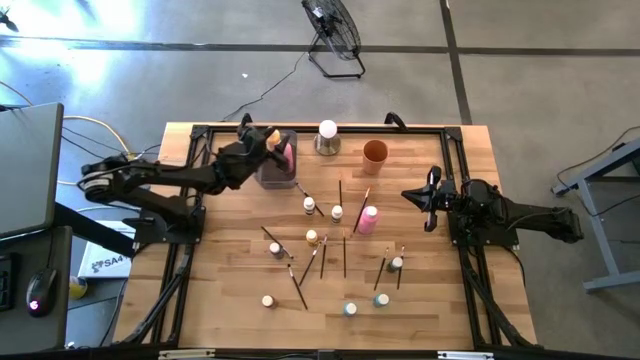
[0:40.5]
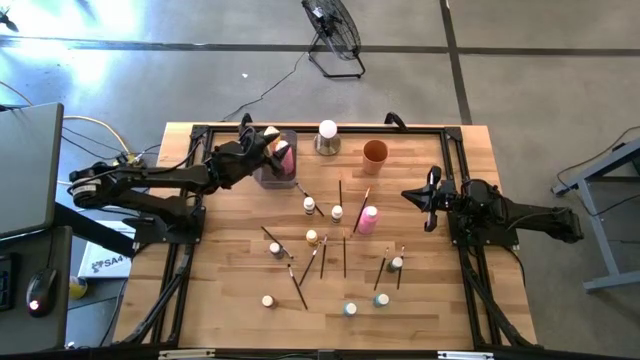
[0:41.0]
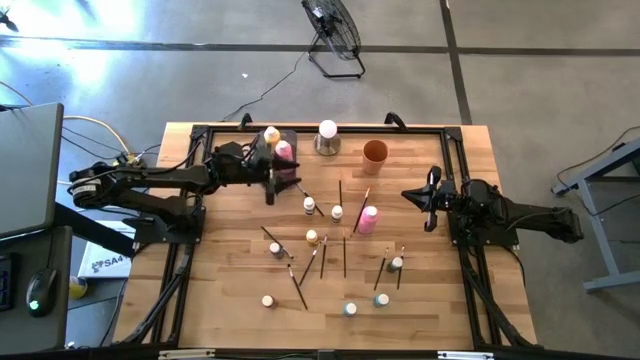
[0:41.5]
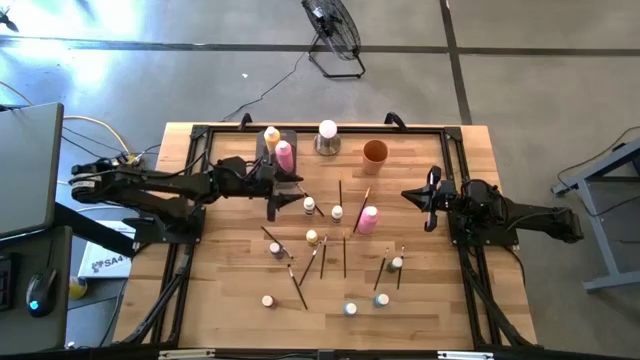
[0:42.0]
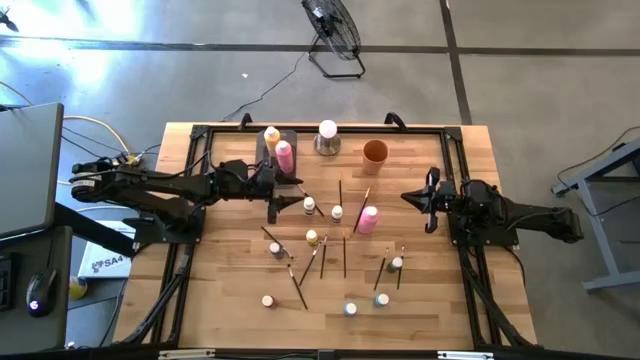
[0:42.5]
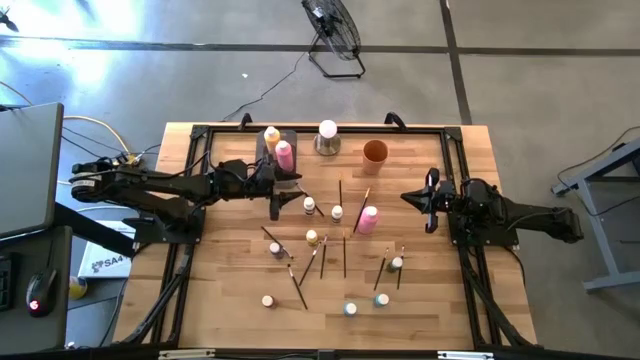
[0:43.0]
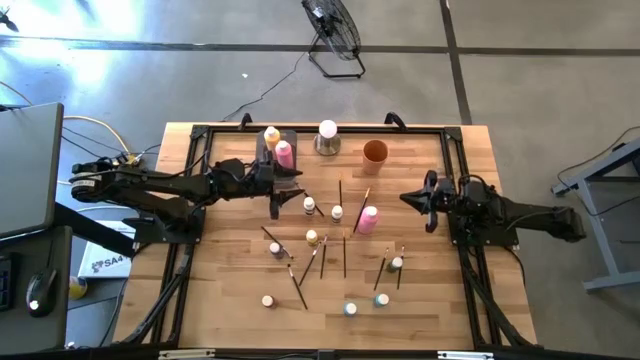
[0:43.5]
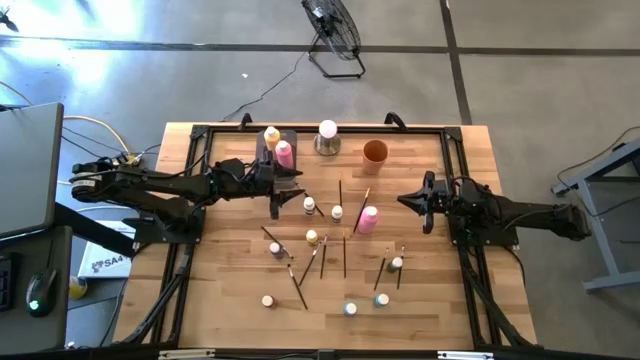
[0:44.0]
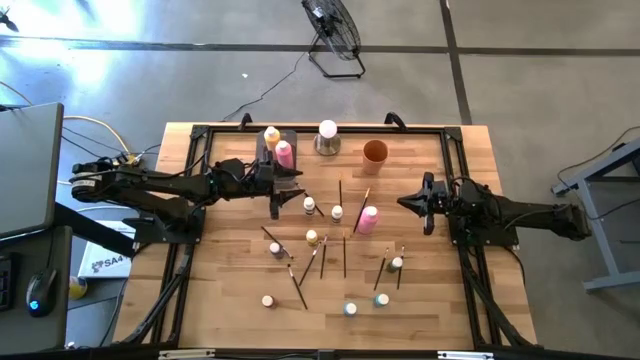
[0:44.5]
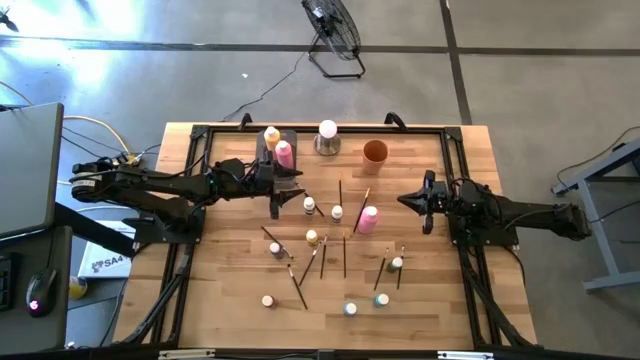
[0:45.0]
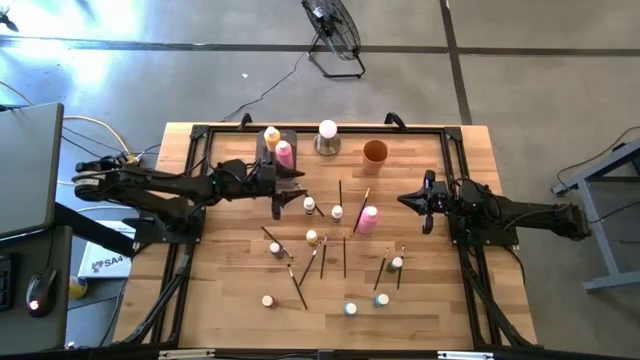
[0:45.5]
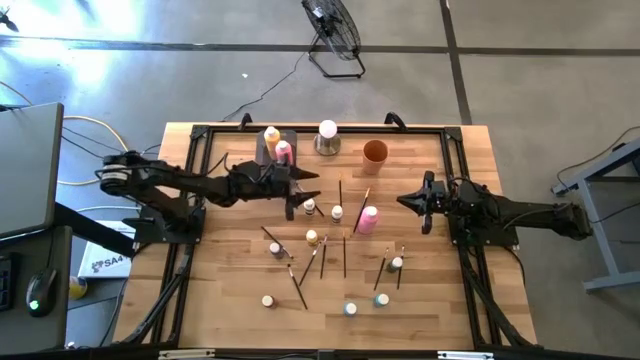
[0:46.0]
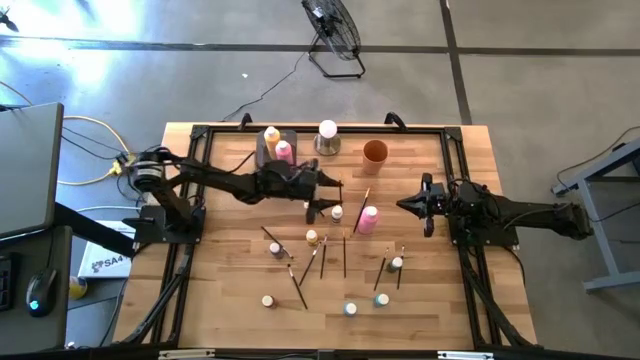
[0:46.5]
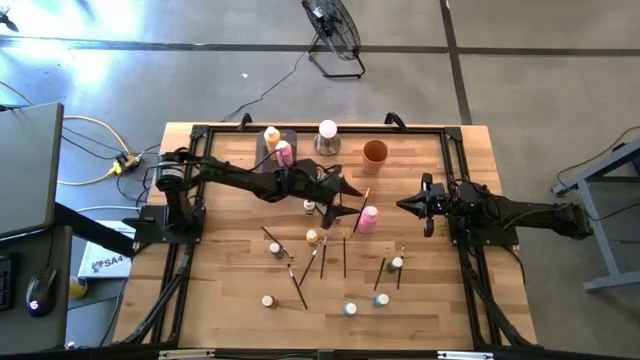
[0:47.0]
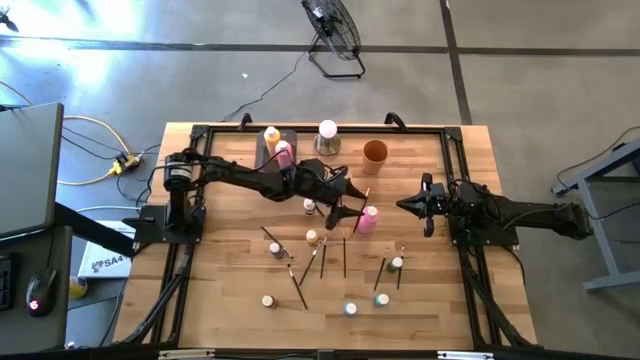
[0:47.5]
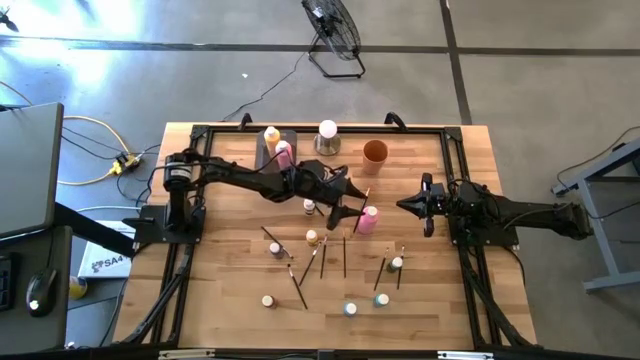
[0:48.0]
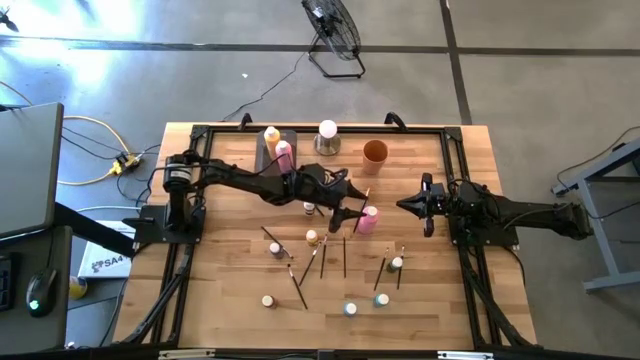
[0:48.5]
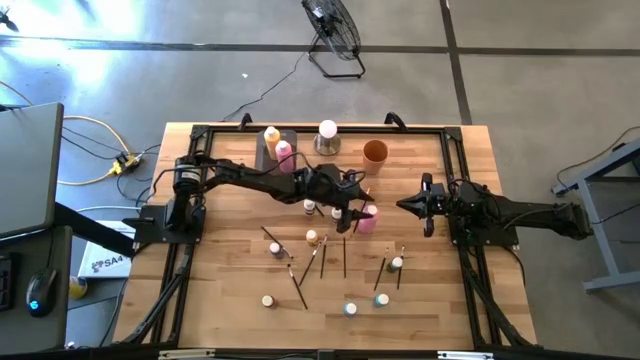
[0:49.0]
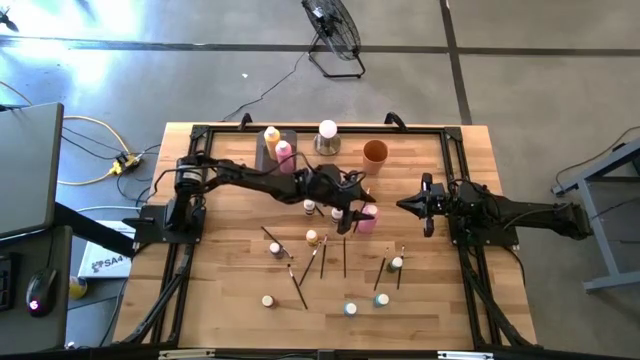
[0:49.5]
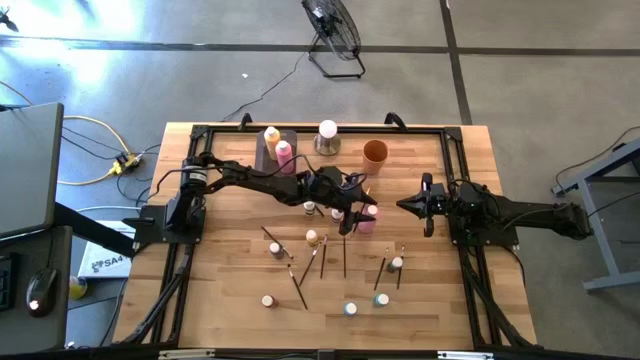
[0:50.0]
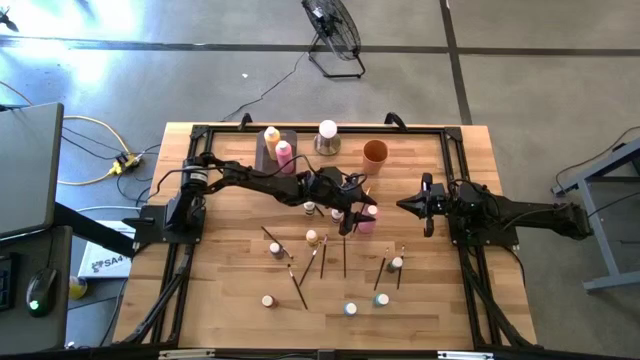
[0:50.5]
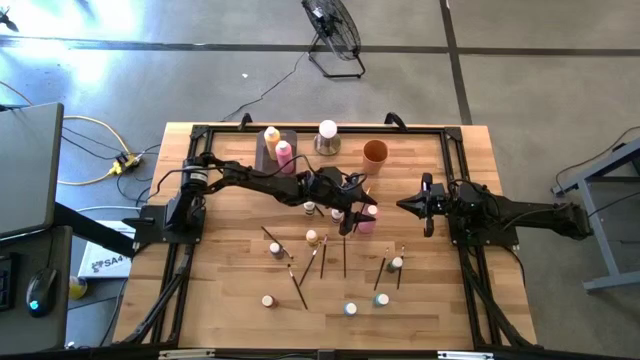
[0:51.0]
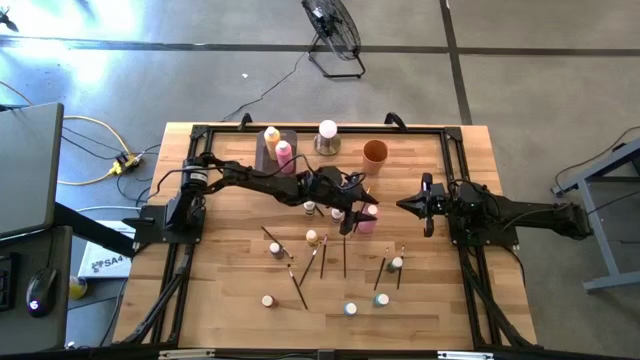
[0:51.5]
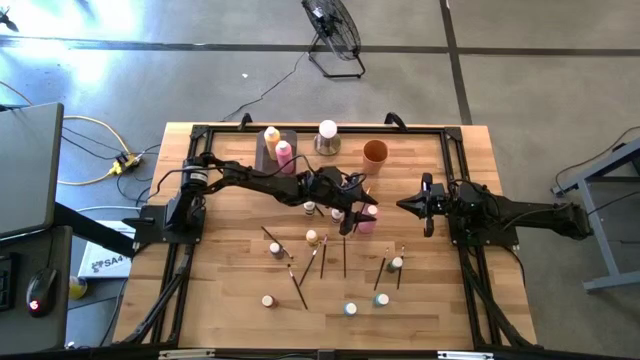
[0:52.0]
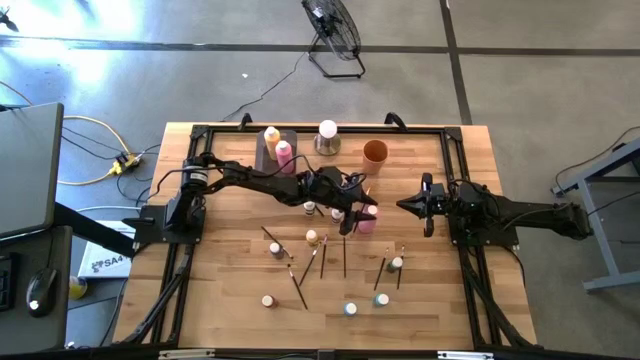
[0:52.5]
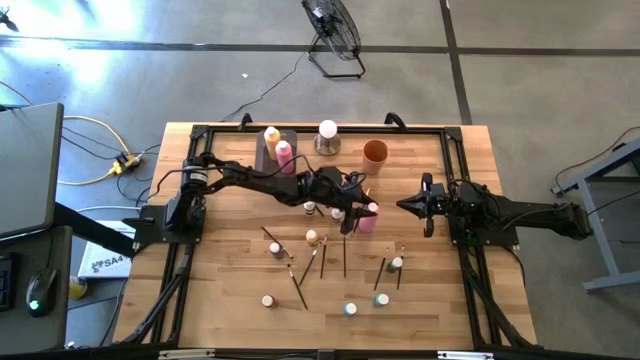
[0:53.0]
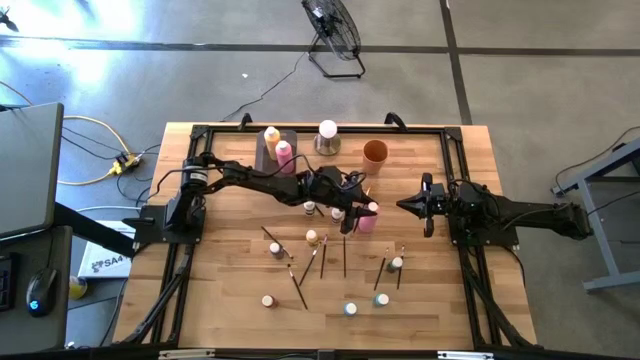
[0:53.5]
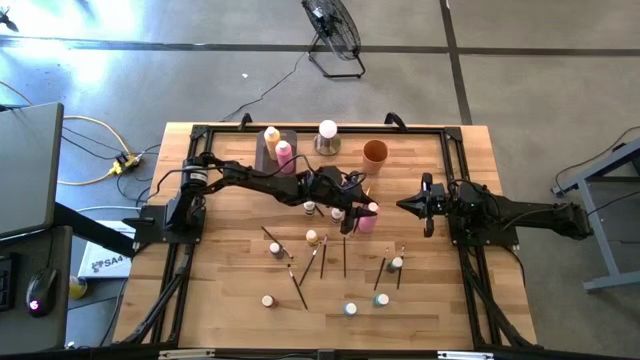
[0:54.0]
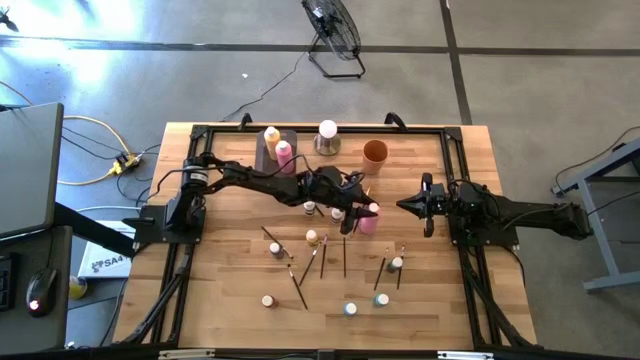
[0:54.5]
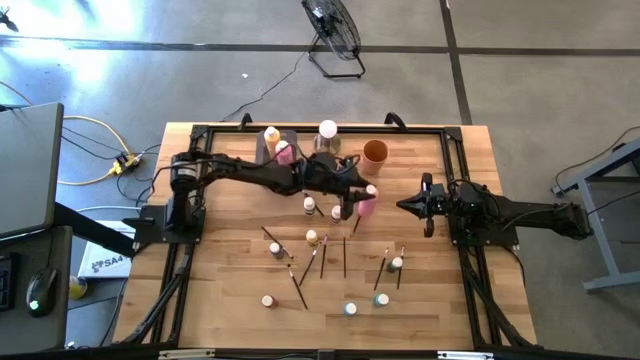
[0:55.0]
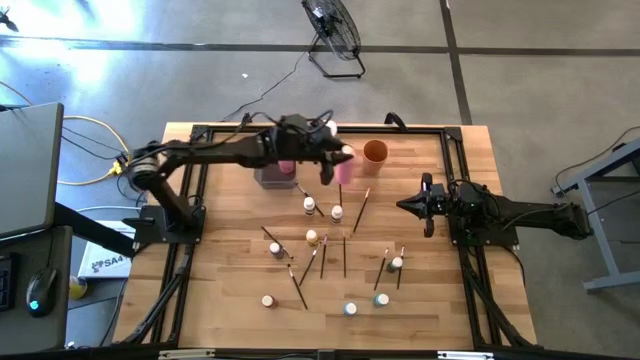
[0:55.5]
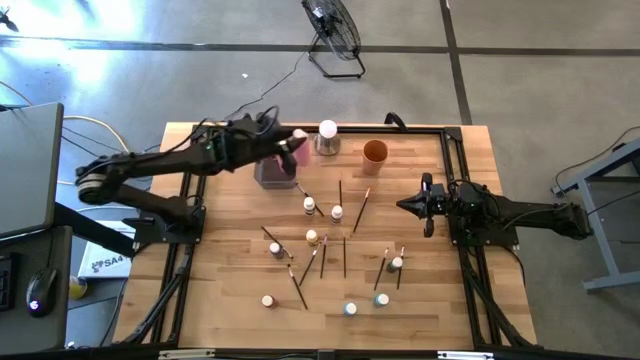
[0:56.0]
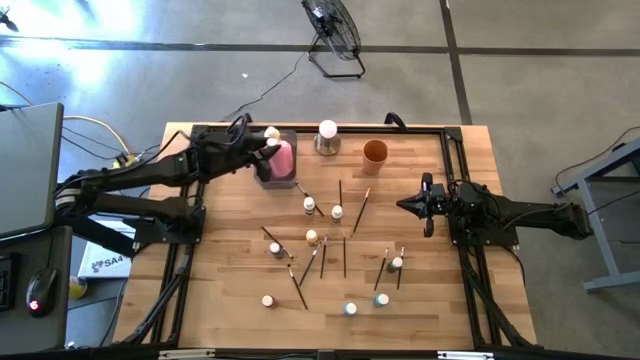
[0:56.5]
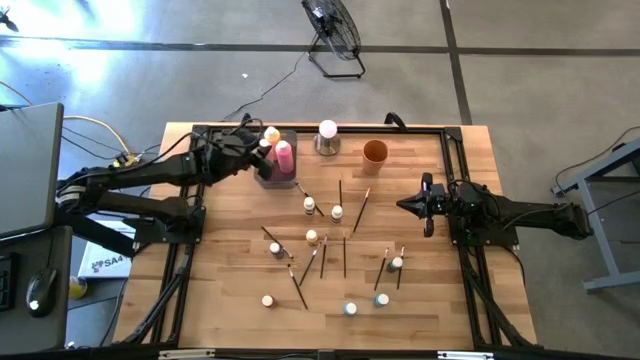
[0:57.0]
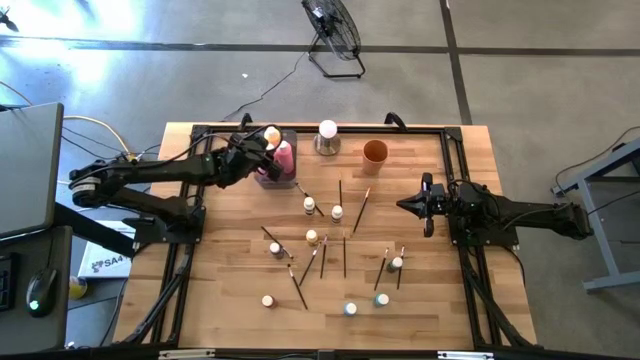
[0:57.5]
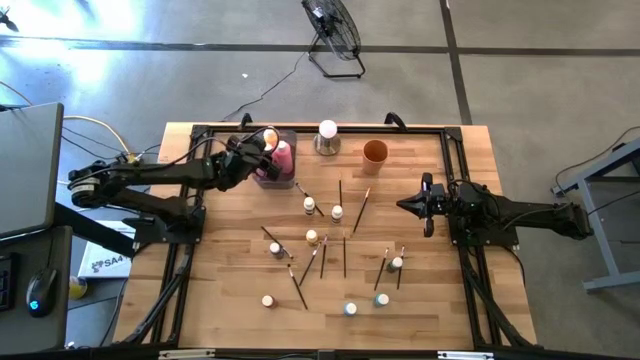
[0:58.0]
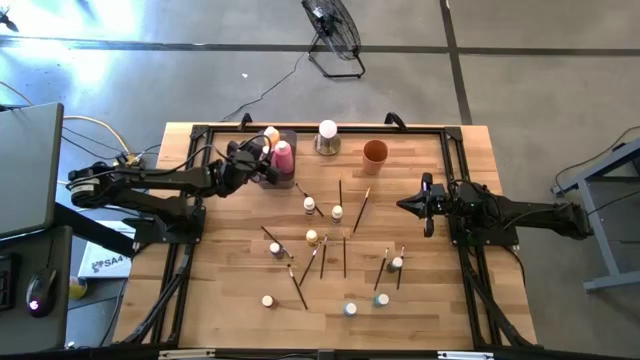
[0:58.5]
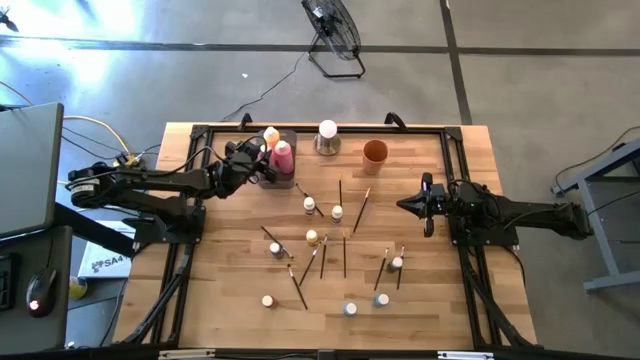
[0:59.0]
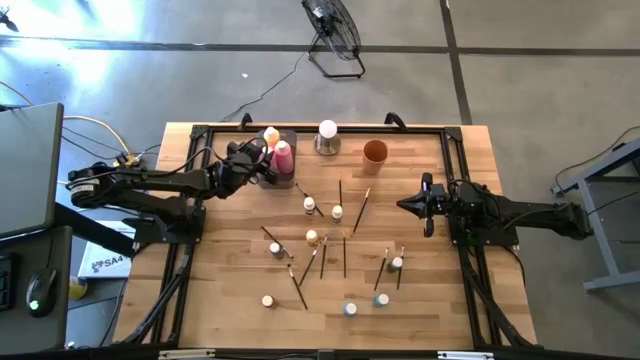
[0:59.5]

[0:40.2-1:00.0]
Task: Pick & Place Paint Supplies
Put the large pink paint bottle into the gray bin

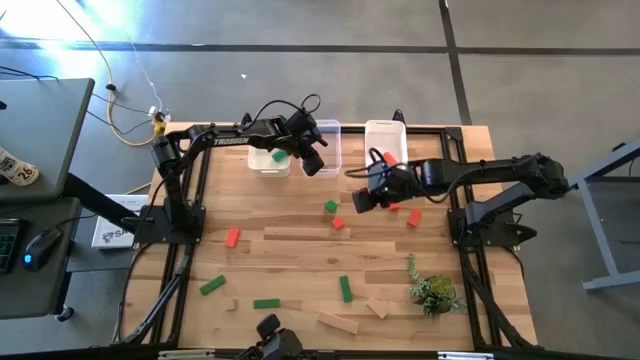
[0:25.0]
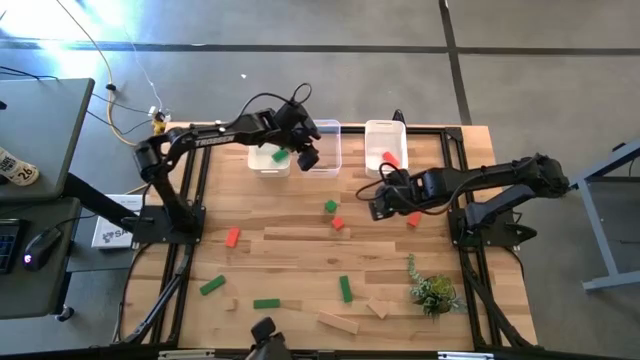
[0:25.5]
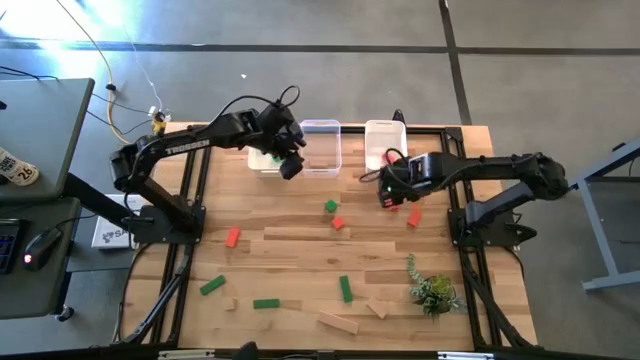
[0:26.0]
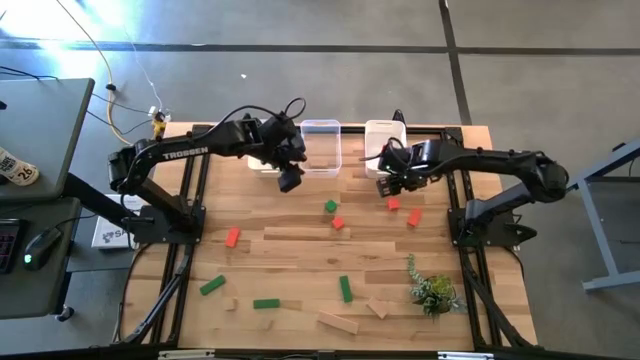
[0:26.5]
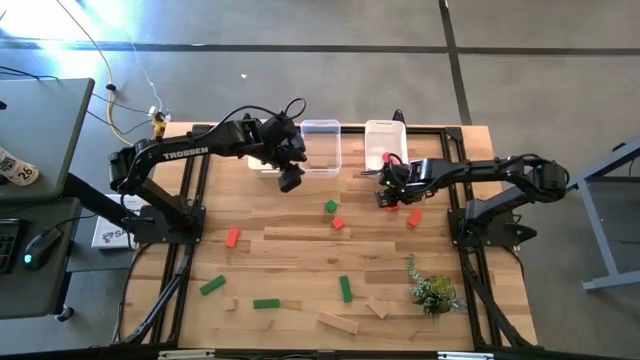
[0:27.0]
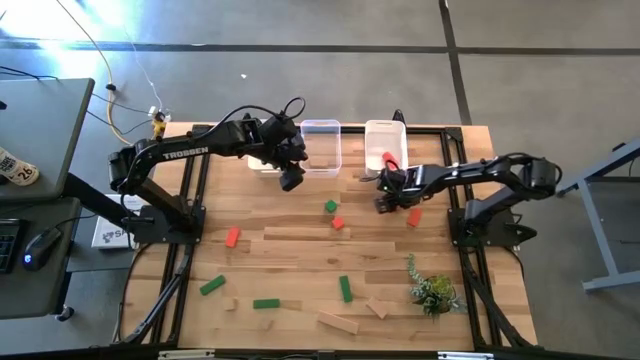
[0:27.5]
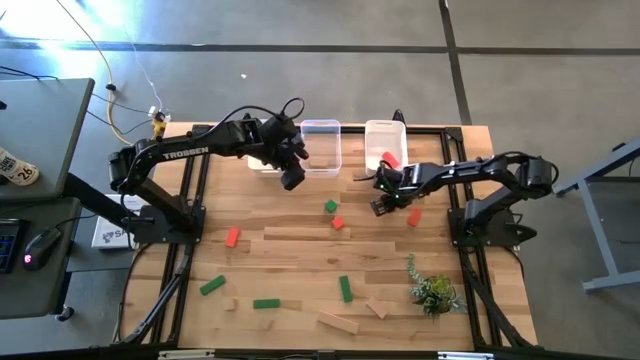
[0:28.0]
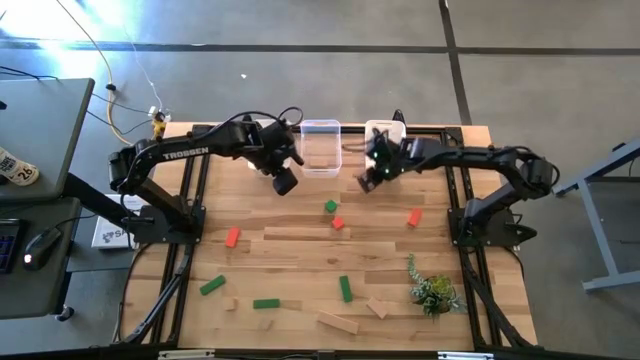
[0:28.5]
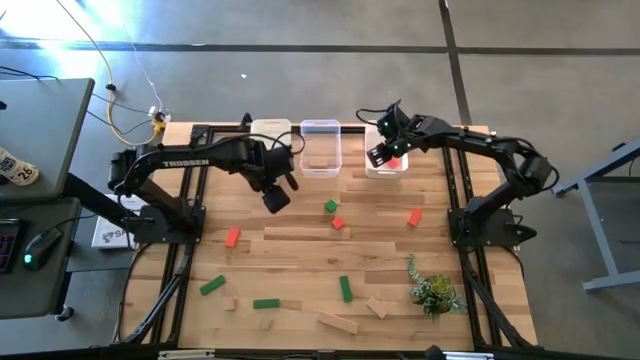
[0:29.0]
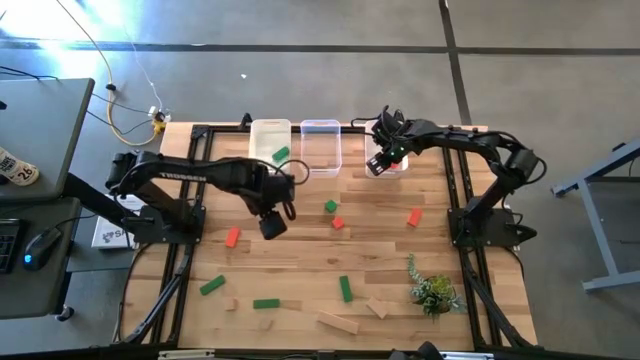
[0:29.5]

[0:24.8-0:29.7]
Task: Sort & place blocks by color
Put the orange block into the right white bin
